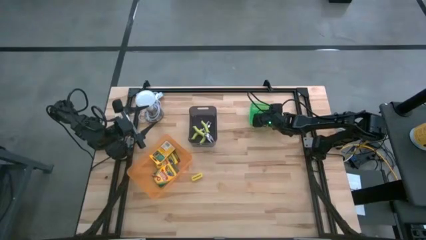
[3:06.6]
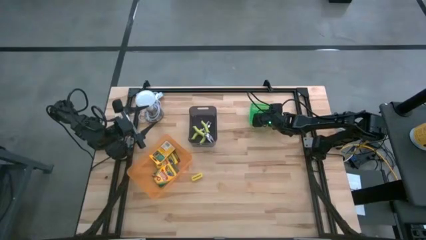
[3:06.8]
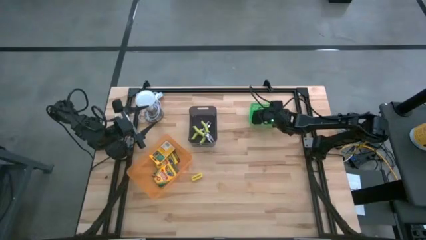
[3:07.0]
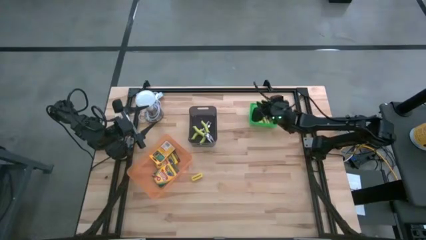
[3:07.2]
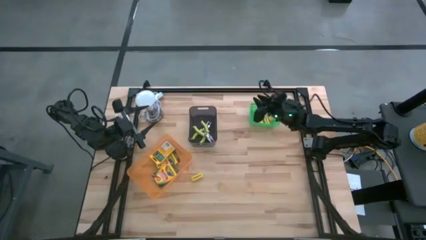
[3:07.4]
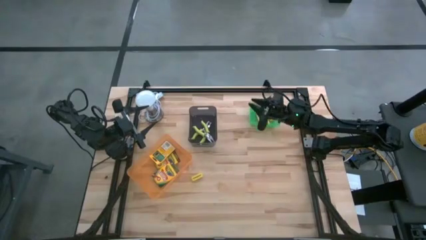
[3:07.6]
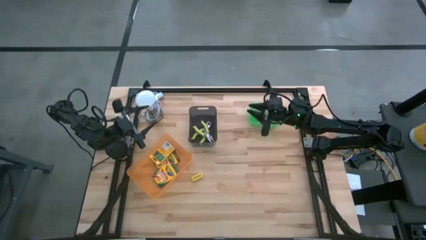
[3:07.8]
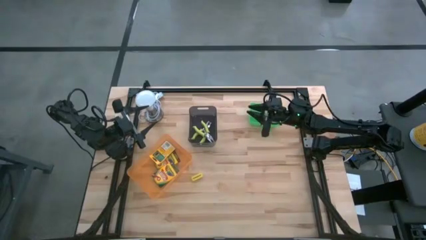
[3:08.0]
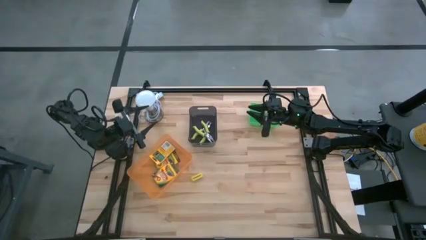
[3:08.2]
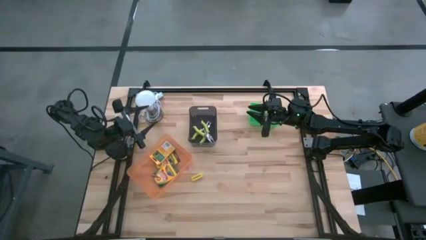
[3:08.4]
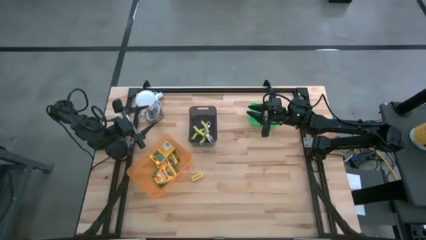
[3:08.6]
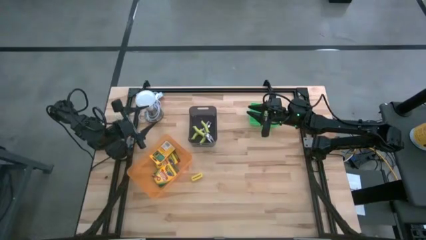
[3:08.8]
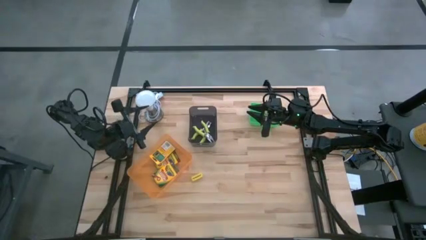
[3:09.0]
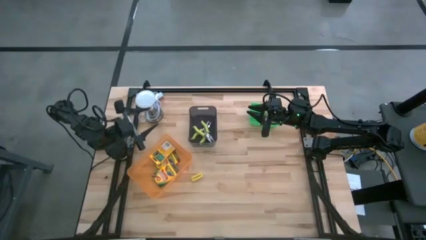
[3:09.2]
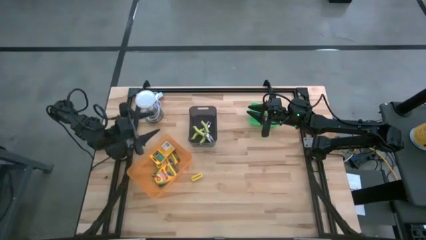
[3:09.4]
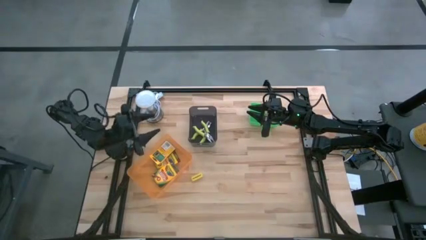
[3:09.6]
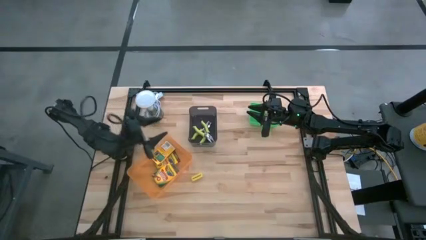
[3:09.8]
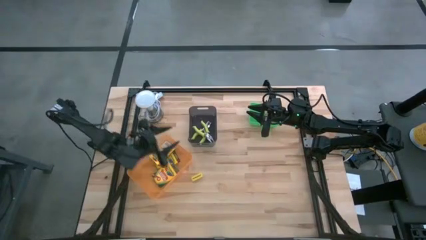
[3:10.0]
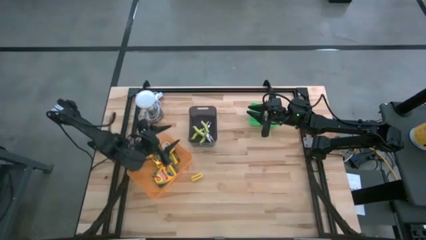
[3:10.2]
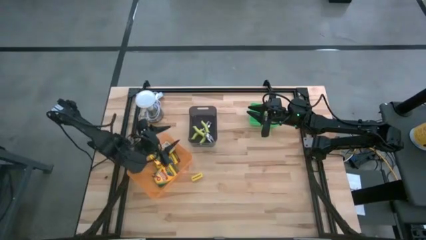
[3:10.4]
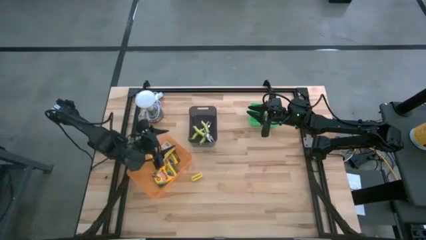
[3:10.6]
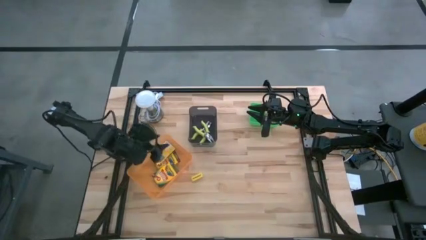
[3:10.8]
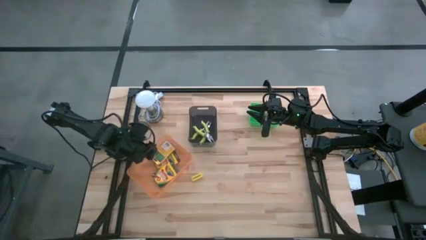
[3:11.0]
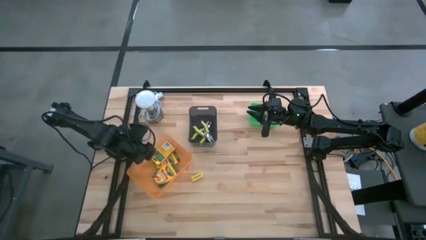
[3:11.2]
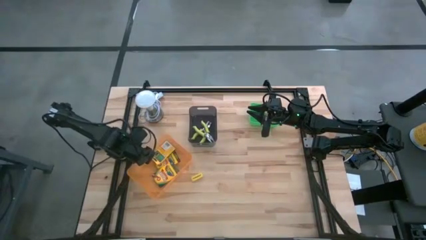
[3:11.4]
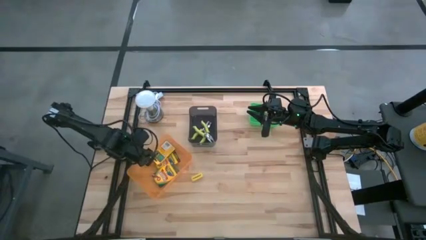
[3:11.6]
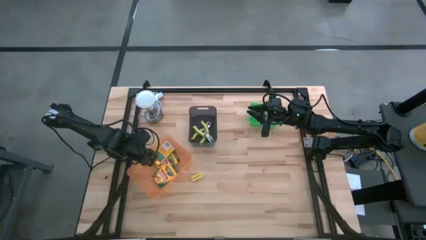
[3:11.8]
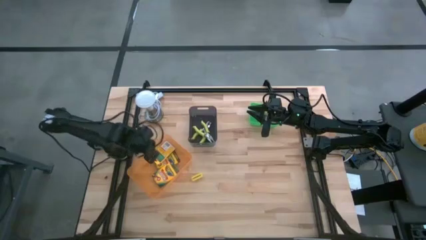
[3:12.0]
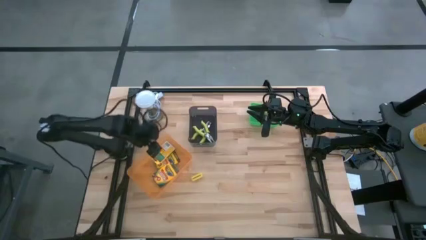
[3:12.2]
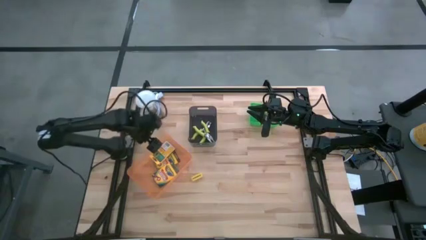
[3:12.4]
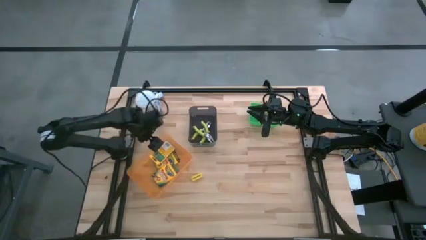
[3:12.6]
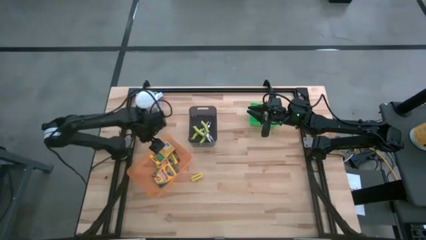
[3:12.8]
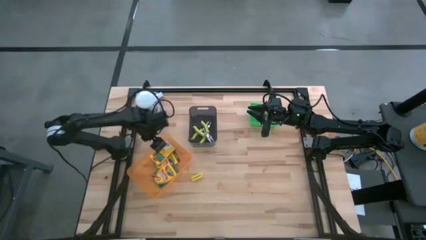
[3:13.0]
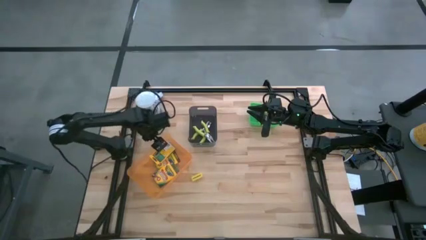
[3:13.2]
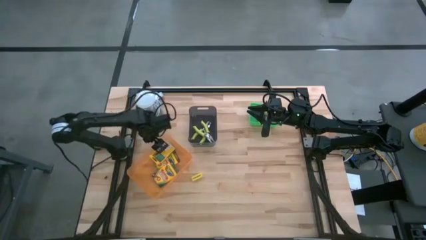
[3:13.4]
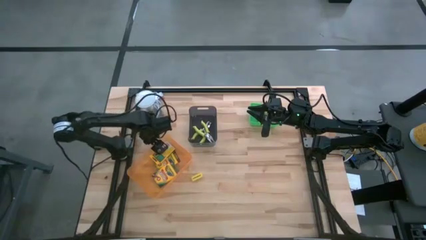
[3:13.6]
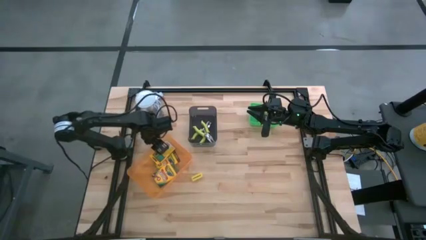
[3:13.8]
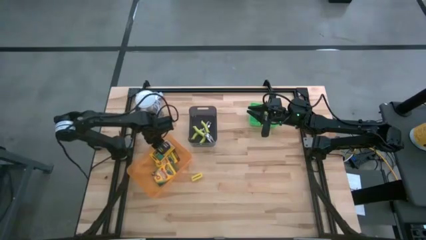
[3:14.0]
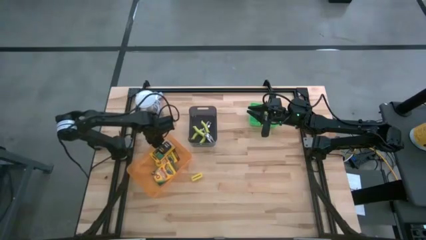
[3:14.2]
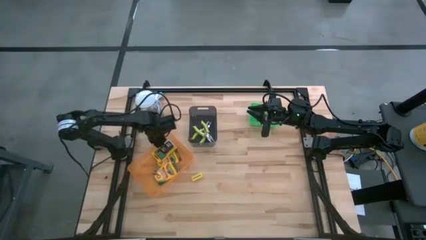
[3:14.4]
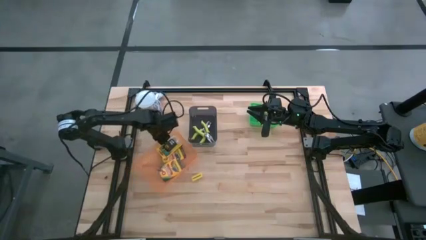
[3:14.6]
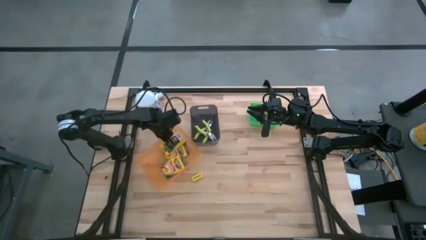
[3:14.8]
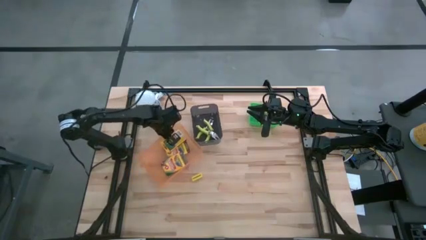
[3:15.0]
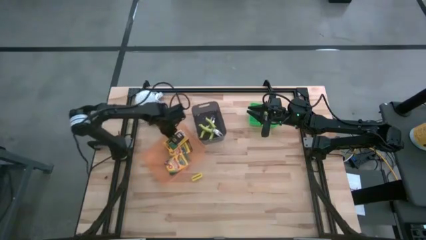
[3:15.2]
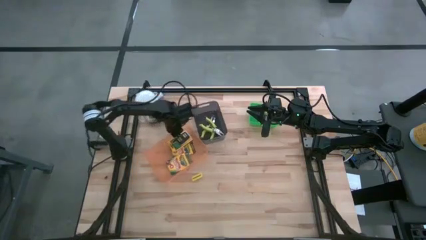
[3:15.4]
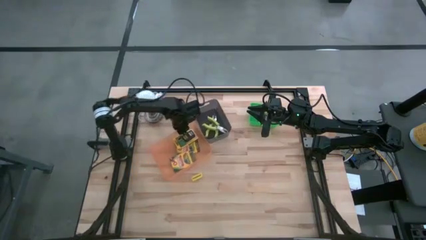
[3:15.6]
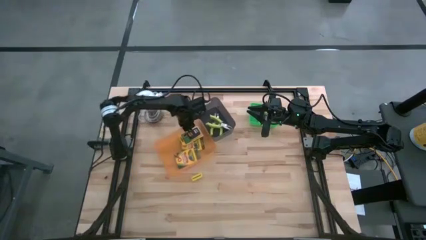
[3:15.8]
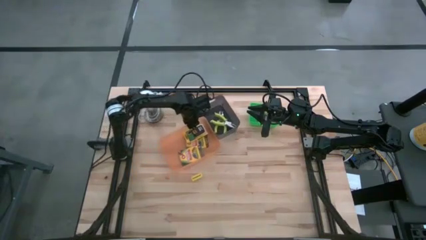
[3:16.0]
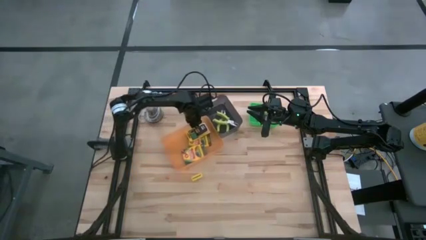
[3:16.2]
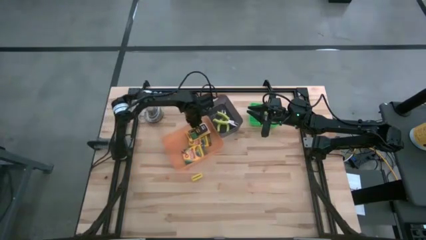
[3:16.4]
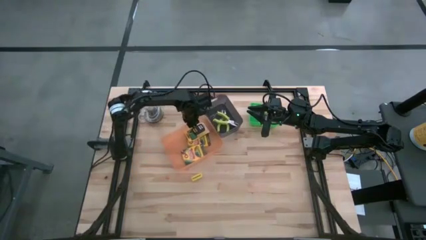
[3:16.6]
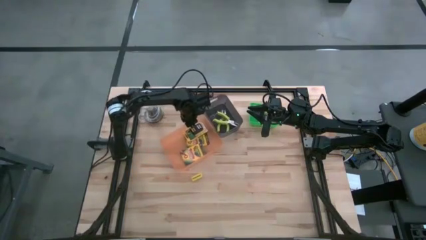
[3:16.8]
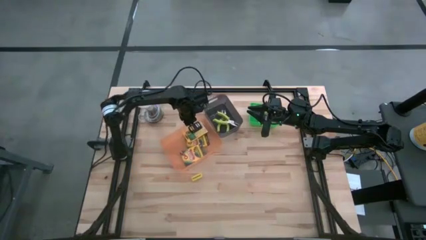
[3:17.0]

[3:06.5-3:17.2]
Task: Pick & Place School Supplies
Adjust the orange bin
